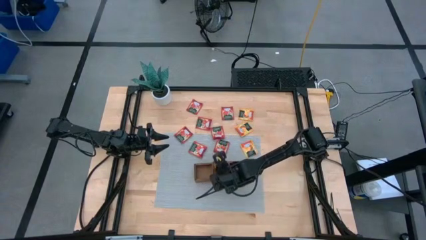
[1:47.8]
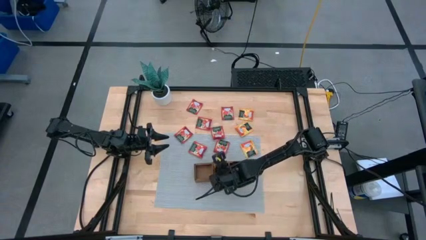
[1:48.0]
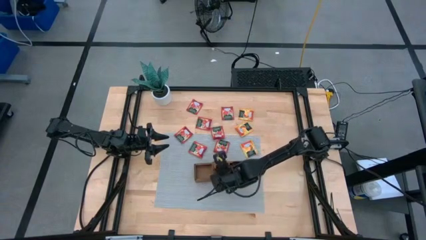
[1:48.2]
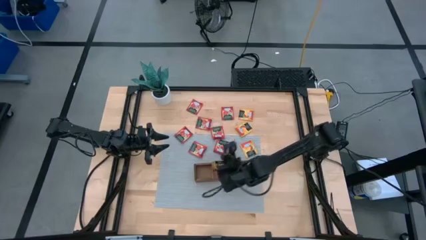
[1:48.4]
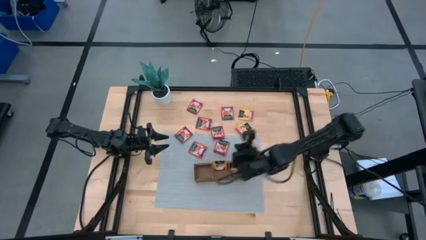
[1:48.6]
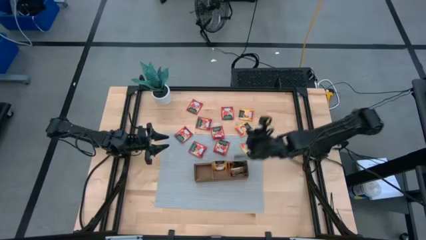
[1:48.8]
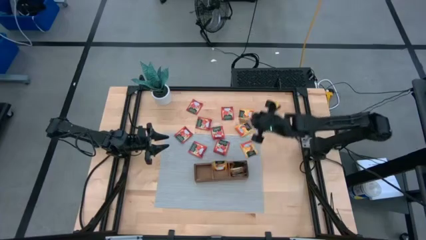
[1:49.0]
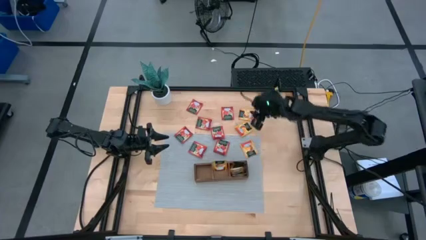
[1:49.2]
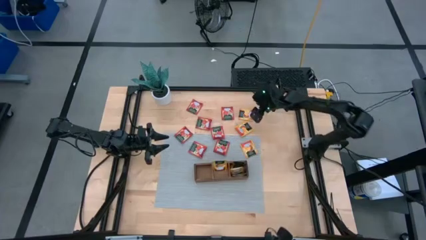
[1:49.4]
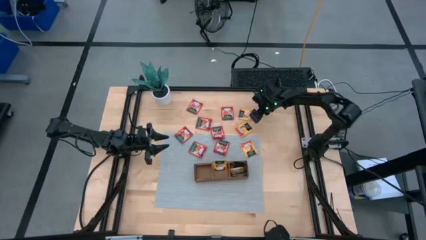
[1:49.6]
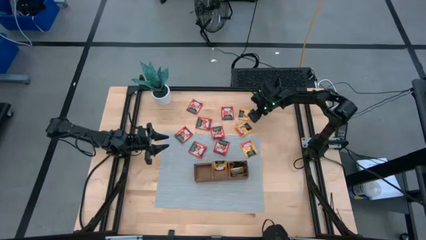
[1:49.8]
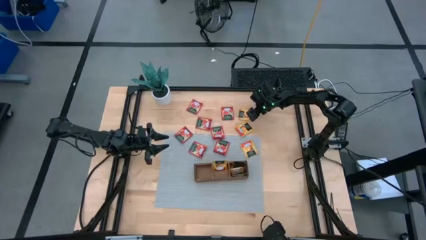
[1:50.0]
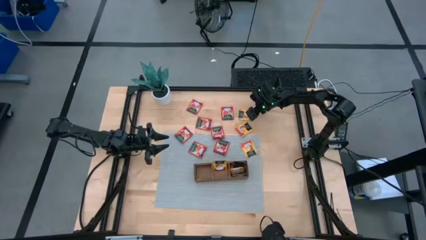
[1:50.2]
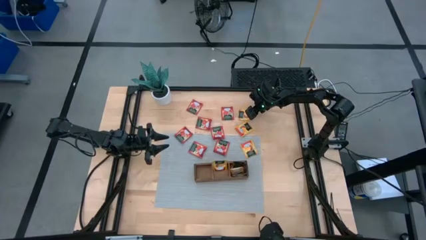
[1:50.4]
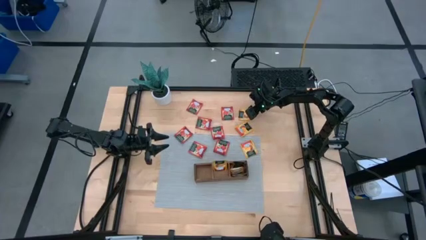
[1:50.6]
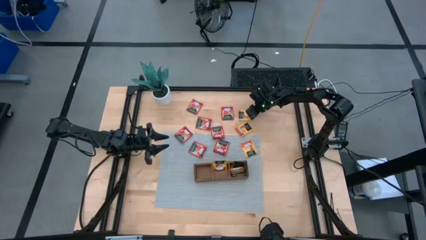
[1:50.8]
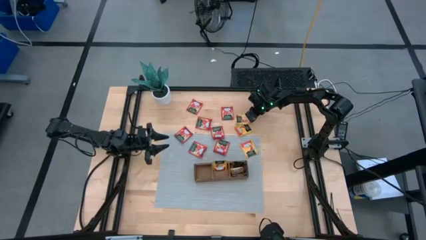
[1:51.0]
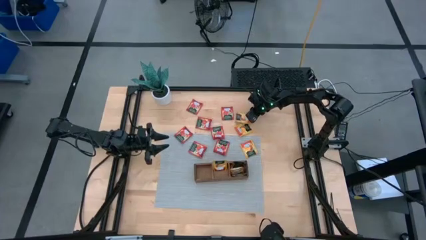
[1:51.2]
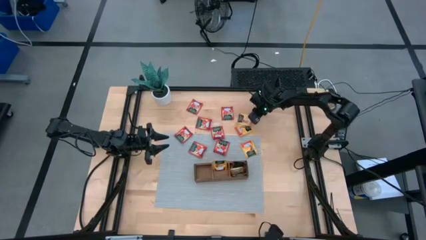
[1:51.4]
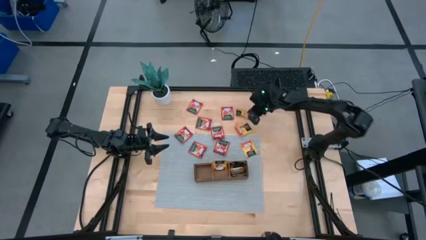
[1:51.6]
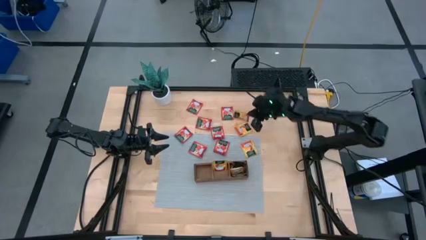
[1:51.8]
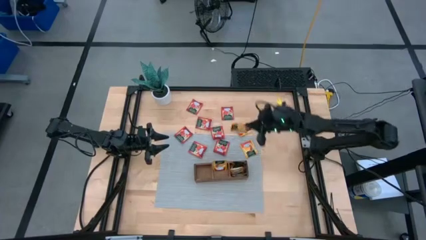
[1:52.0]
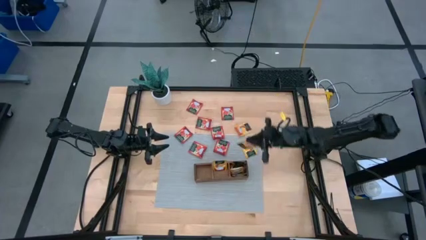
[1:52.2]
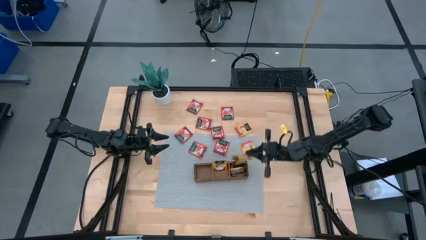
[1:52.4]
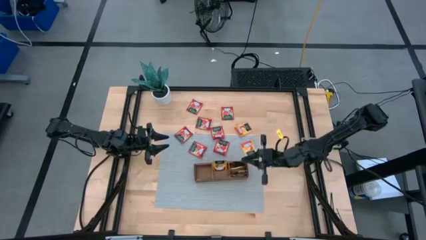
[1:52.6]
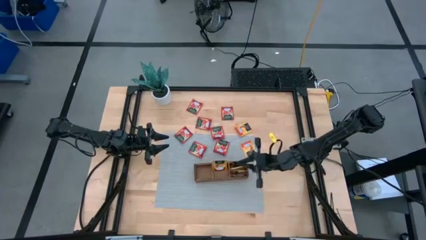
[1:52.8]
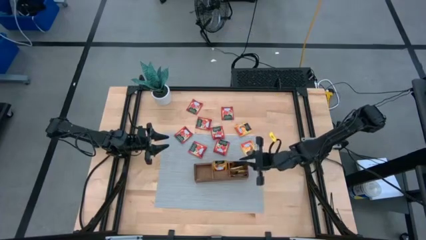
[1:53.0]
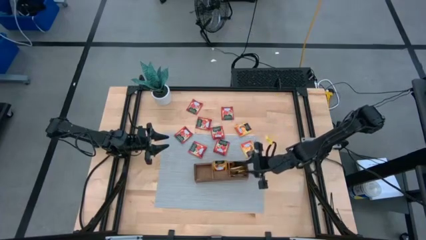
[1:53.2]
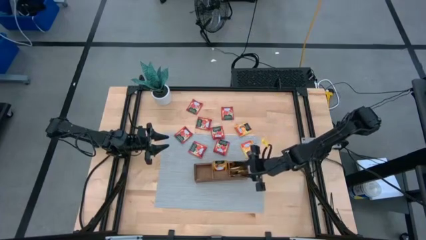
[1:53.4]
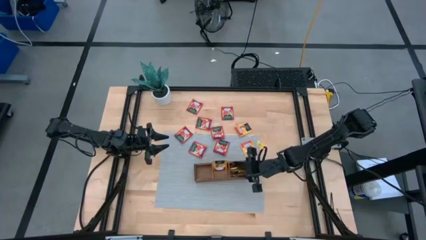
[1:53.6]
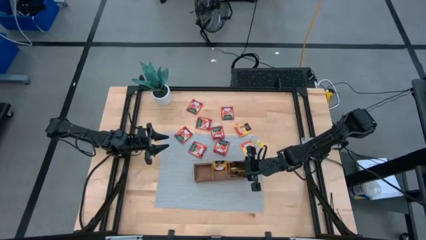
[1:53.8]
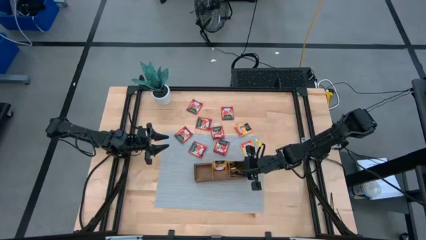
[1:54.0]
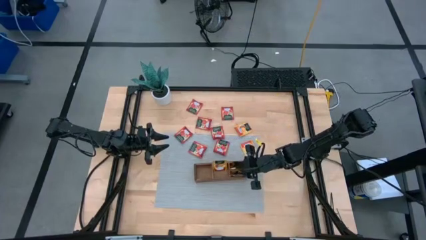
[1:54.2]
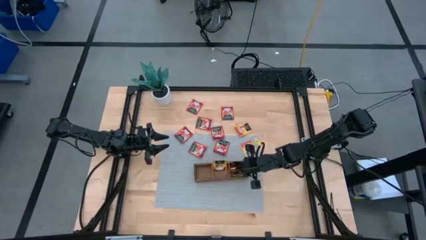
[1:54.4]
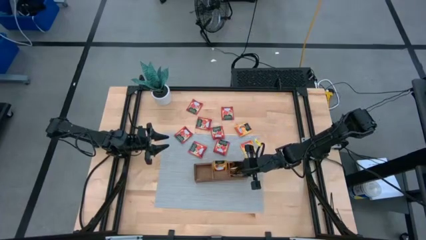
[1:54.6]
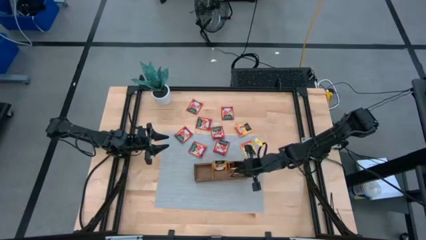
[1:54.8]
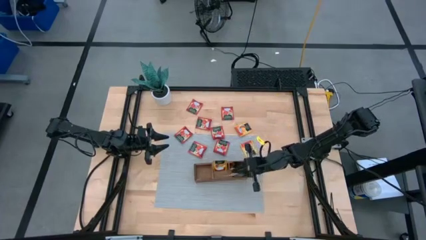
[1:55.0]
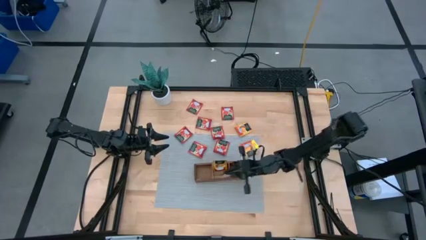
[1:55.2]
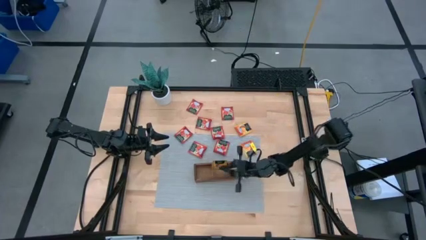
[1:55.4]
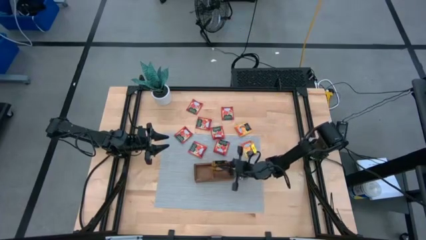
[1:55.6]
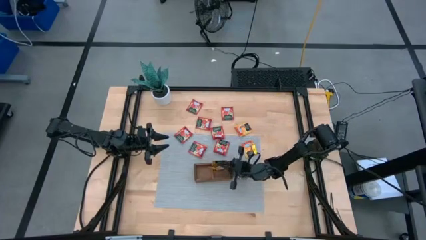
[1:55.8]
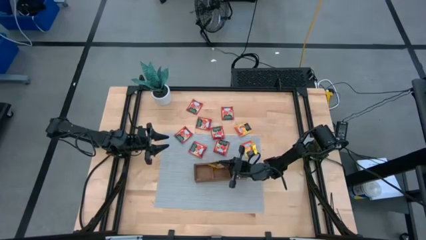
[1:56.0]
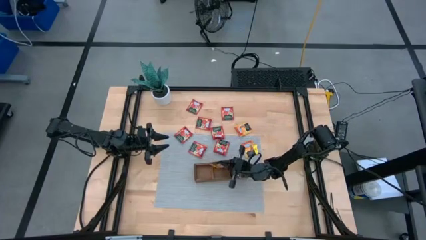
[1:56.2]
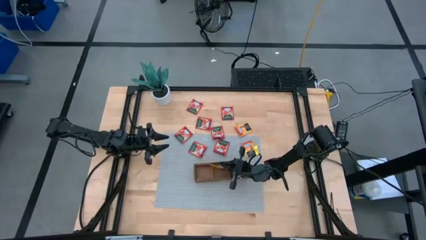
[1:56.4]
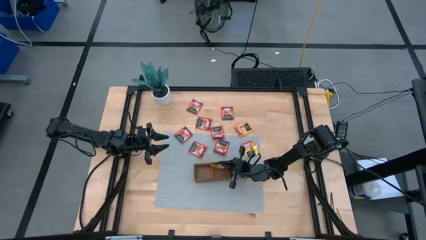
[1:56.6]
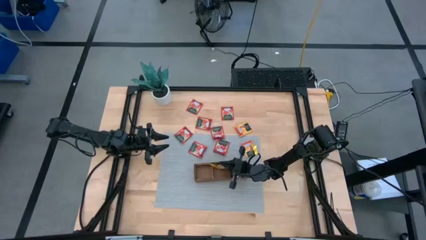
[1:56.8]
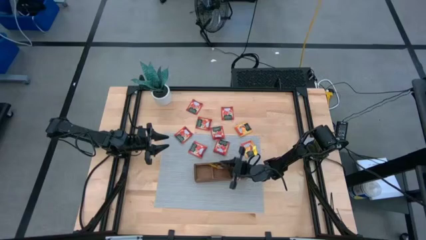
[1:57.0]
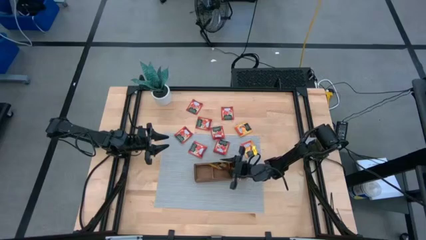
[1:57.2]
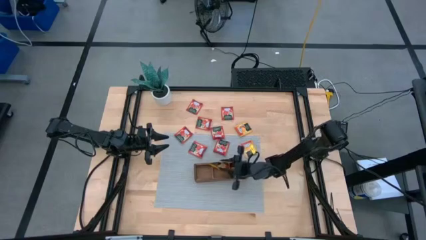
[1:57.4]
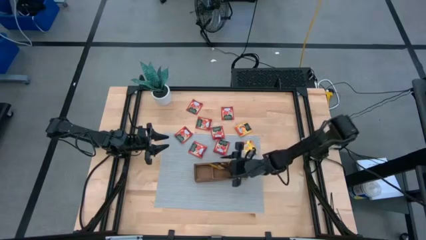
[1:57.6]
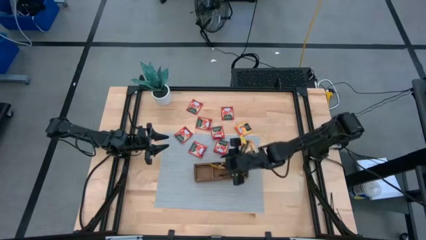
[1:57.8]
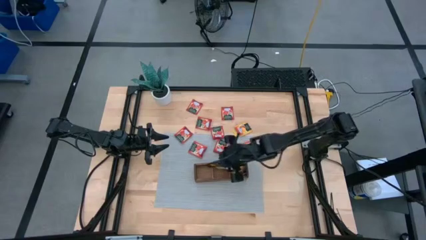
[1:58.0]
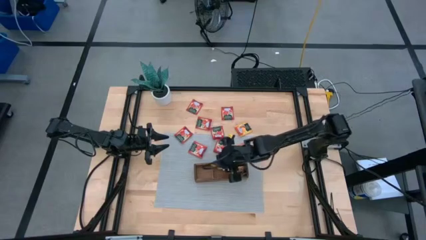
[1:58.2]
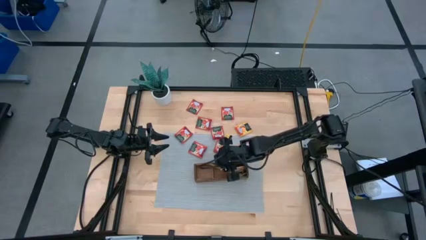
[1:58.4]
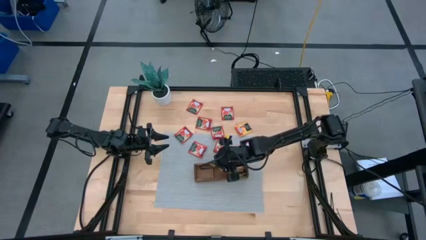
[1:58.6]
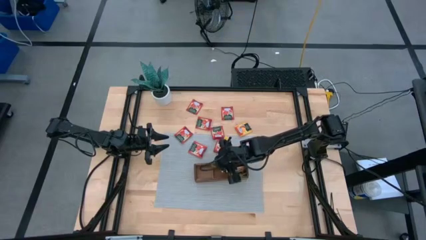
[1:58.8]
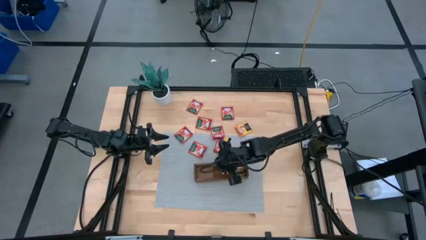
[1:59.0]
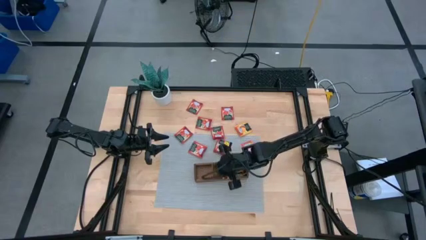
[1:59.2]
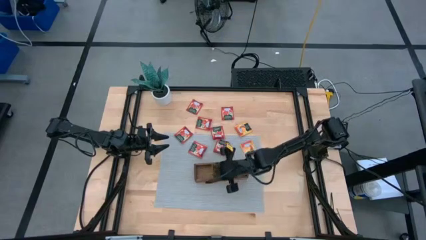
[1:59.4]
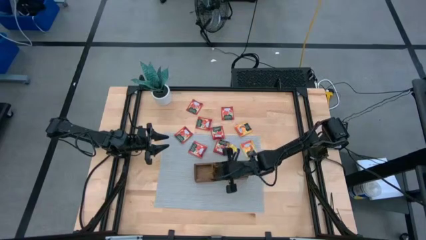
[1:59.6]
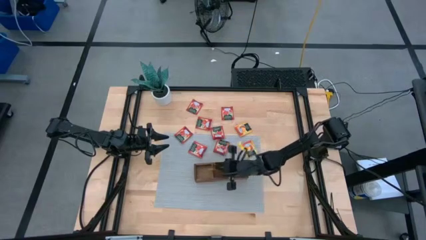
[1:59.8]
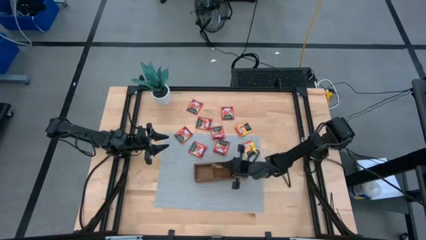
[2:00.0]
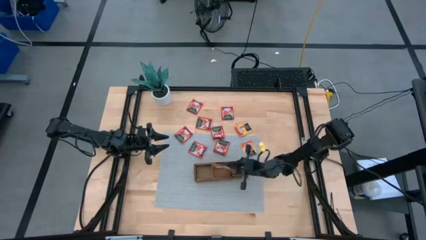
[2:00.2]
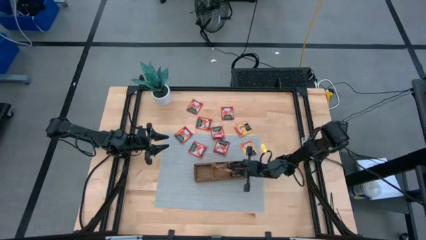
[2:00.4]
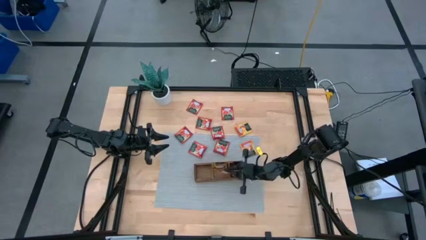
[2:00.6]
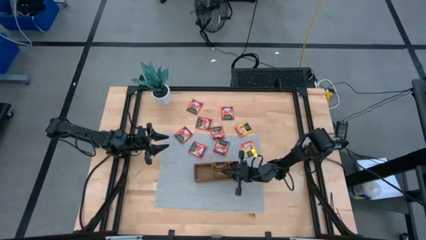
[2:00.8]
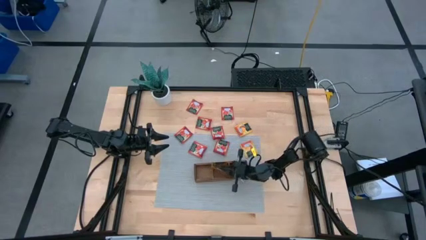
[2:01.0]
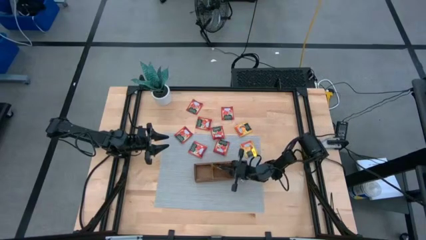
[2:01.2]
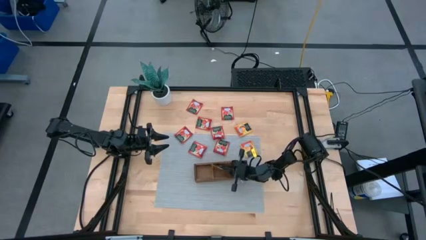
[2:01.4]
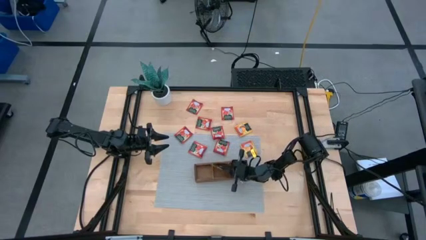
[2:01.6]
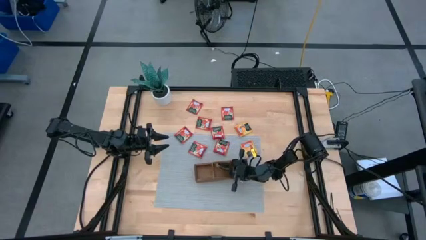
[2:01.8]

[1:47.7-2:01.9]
Task: Pick & Place Tea
Put the yellow tea bag into the middle compartment of the wood organizer

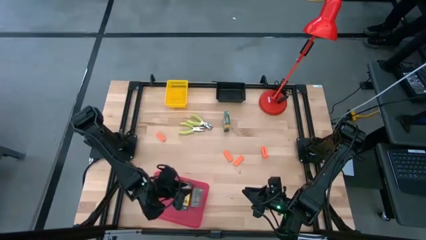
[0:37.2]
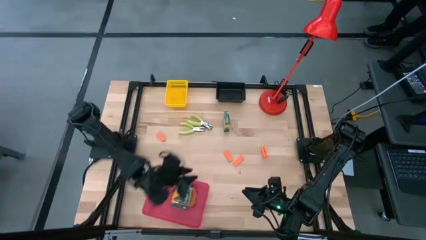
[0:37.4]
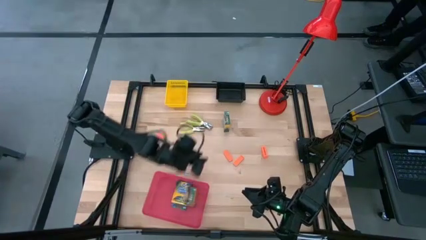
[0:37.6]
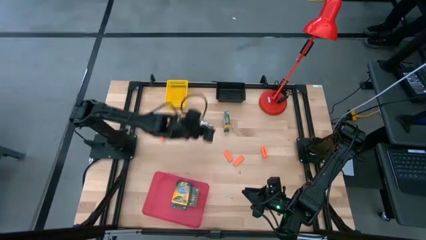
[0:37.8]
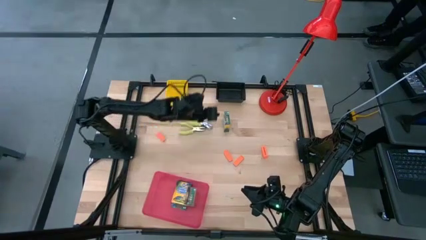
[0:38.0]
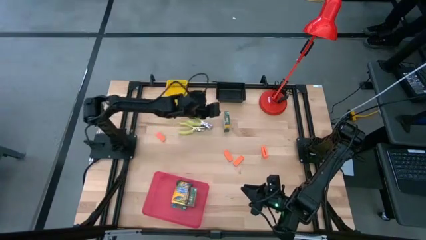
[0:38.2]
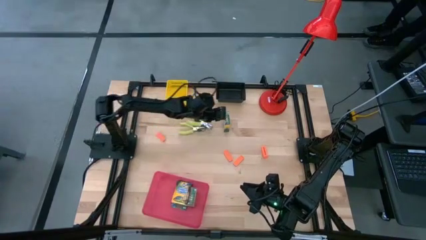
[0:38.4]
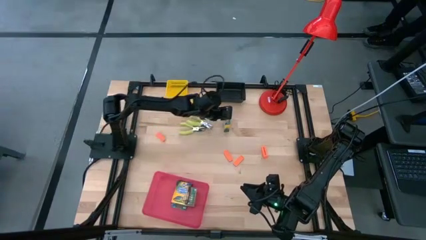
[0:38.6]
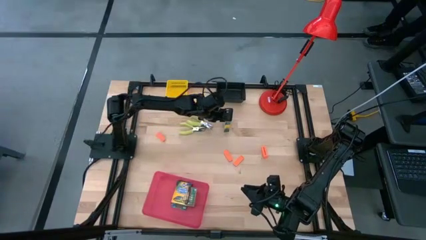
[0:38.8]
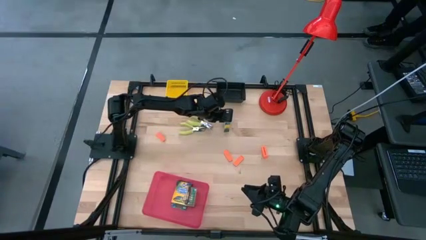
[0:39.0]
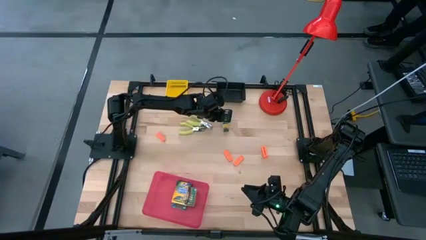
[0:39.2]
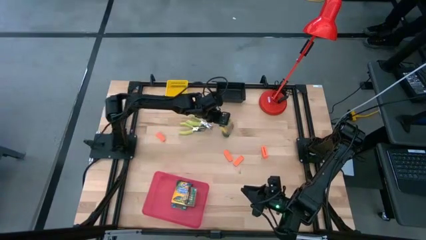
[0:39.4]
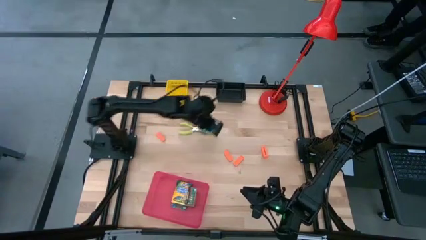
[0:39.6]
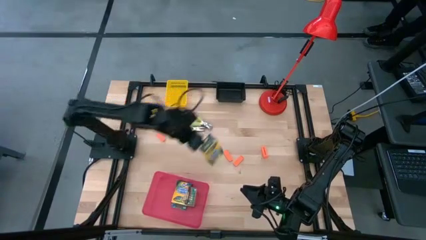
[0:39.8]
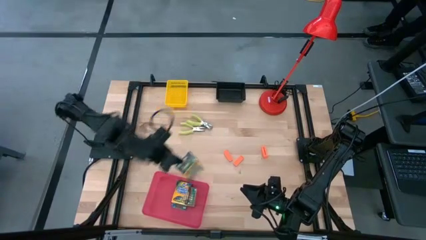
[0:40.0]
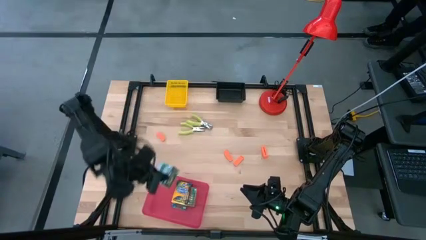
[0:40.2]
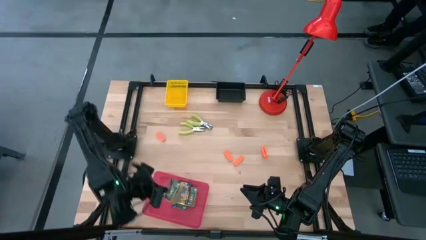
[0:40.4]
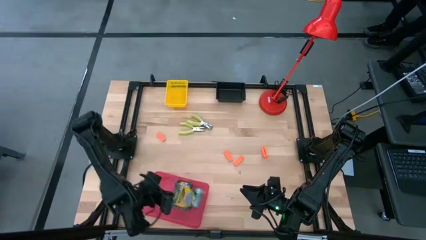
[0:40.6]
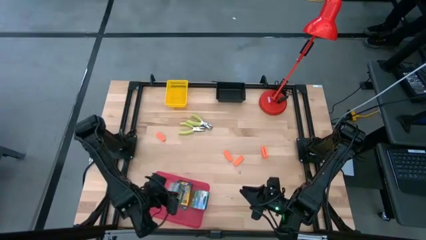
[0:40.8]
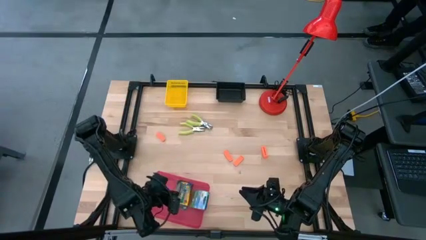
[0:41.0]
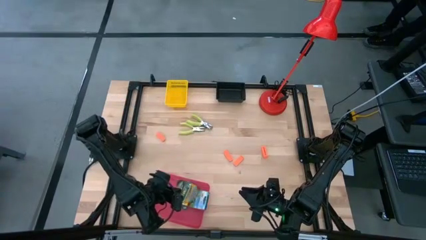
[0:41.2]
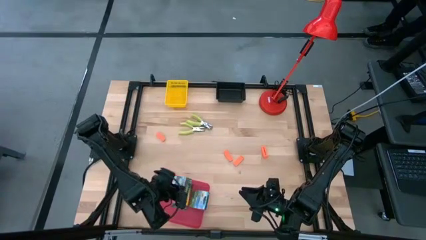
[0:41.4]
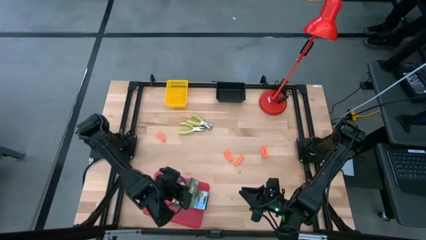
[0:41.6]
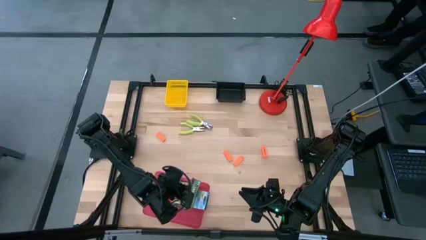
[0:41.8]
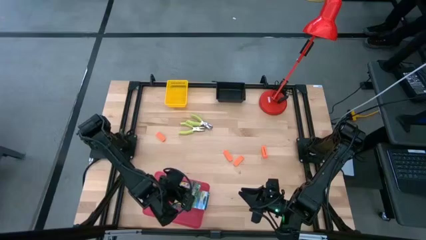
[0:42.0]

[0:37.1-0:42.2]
Task: Pick & Place School Supplies
Put the yellow crayon box into the red bin
